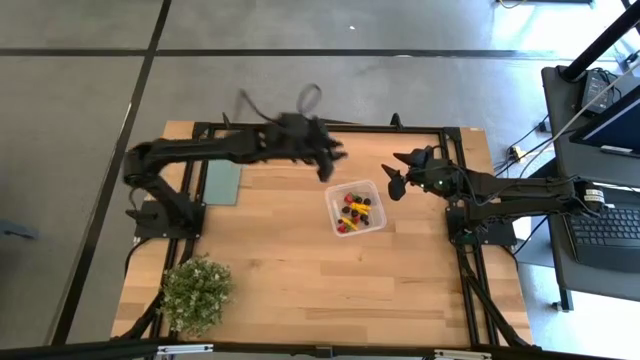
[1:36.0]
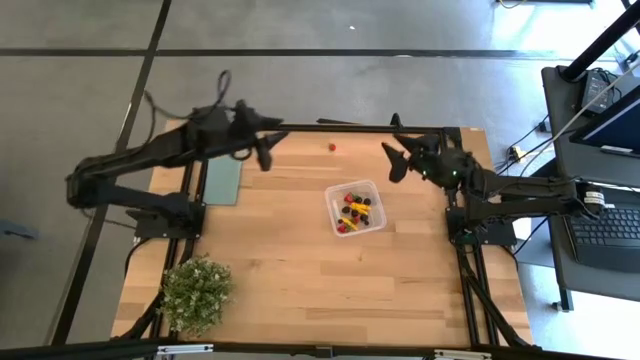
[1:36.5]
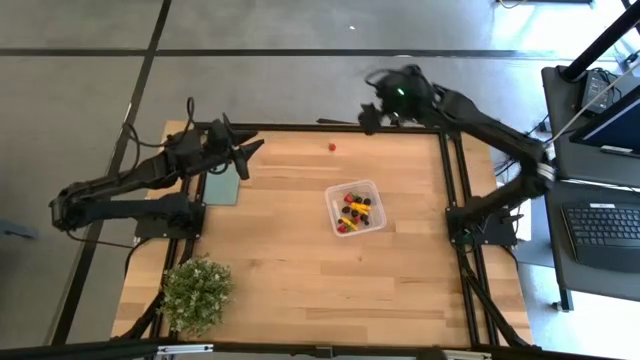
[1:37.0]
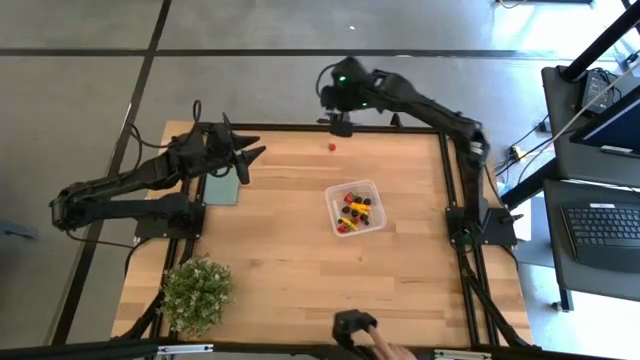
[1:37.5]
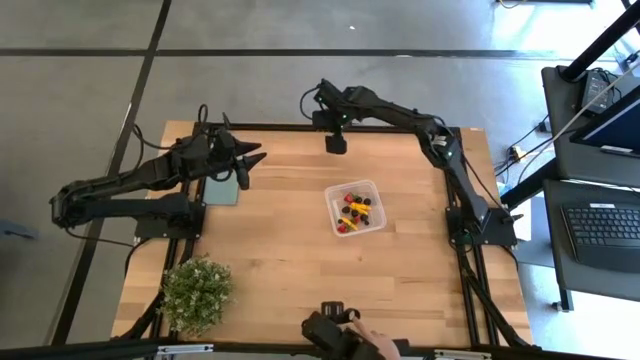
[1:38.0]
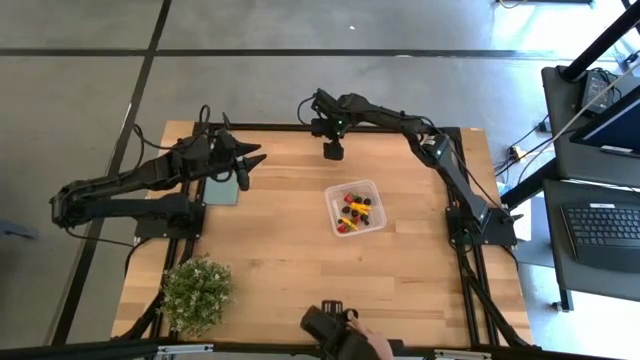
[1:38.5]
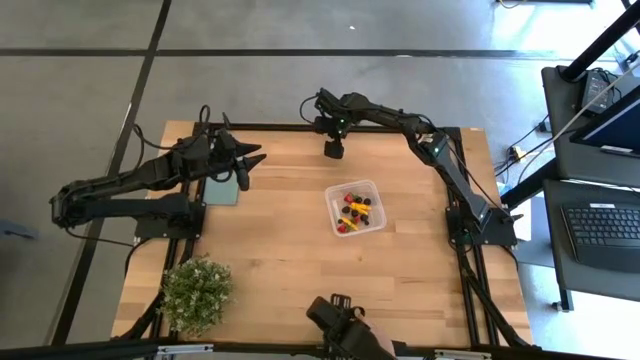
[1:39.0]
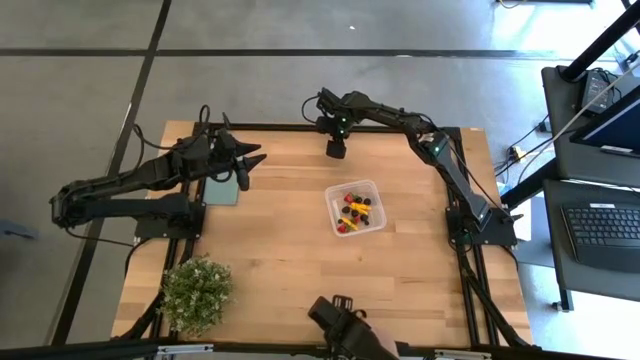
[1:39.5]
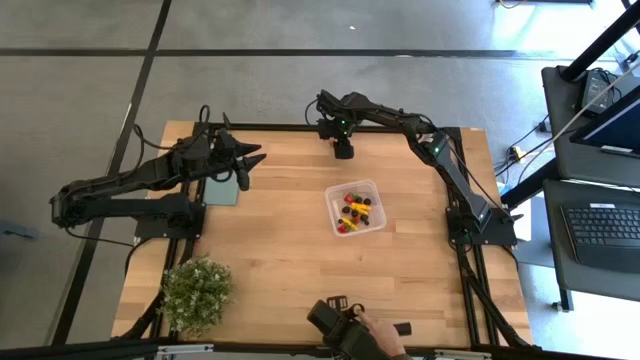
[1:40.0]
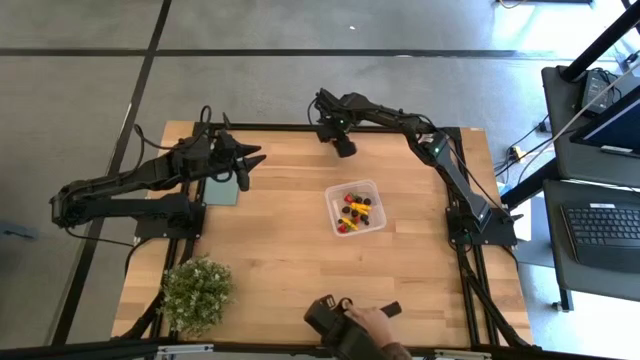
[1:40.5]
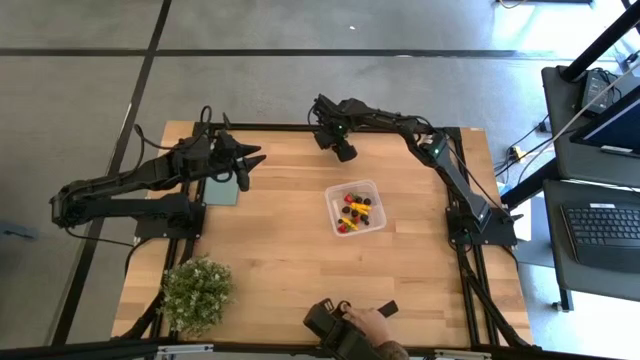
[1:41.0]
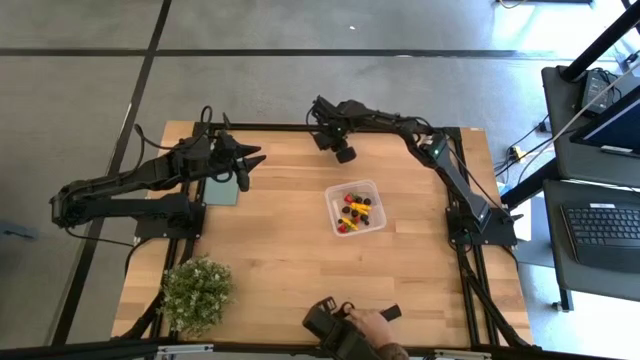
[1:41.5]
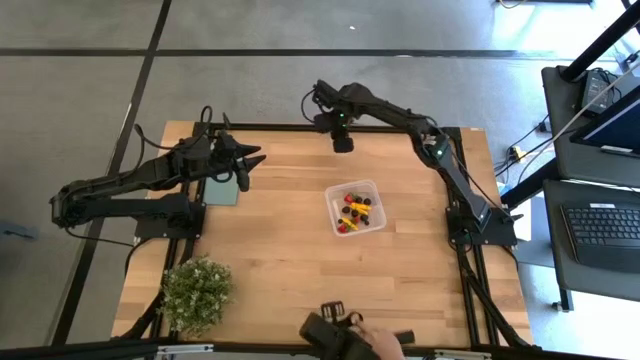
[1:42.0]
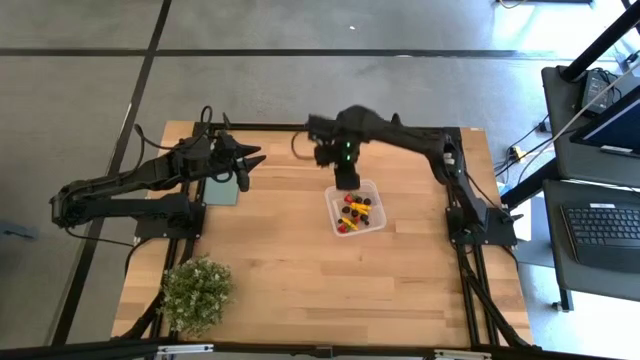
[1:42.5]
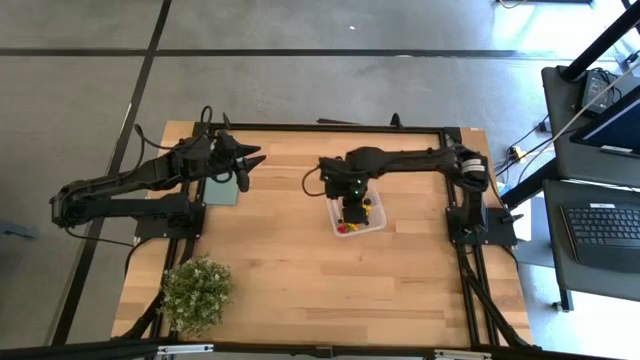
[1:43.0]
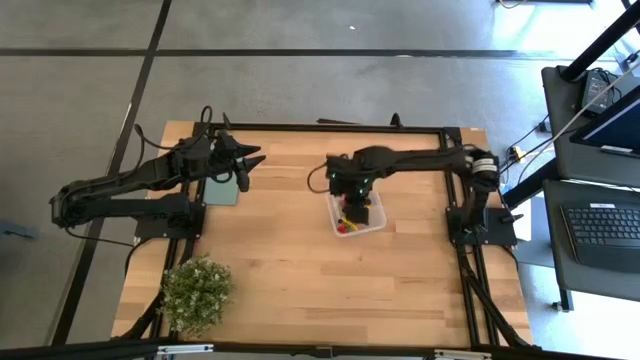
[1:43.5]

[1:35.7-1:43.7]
Task: Pick and placing Produce into tupperware
Put the strawberry into the transparent bin

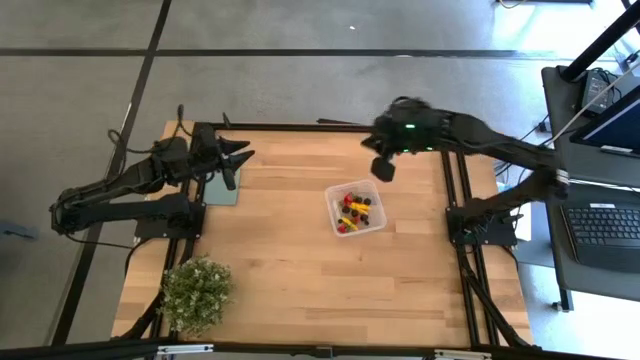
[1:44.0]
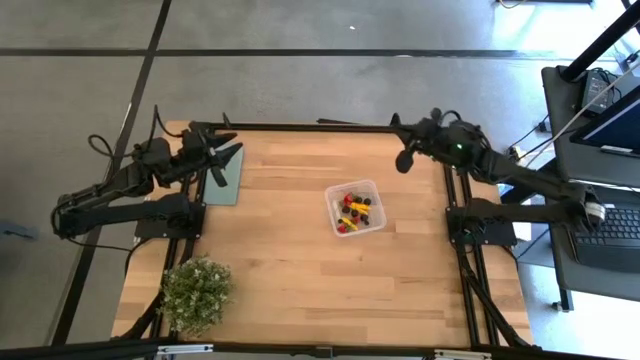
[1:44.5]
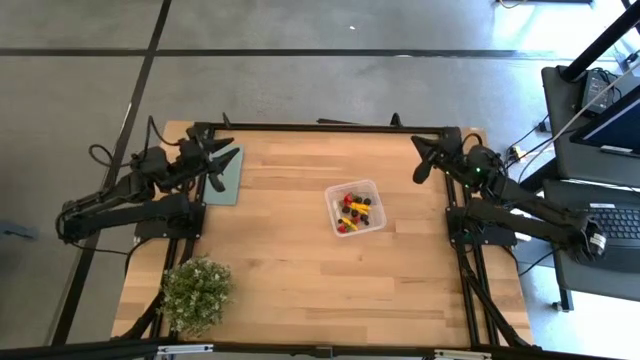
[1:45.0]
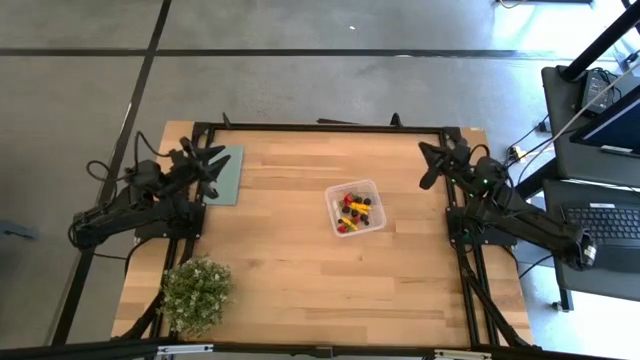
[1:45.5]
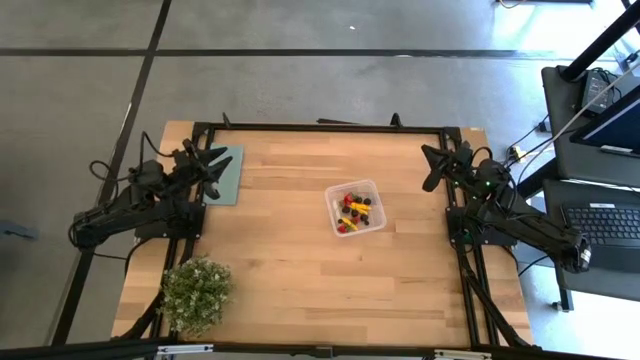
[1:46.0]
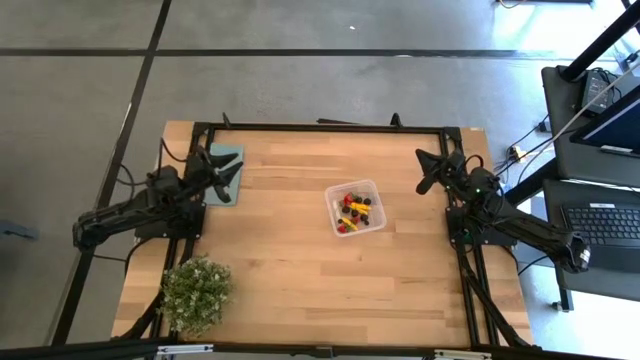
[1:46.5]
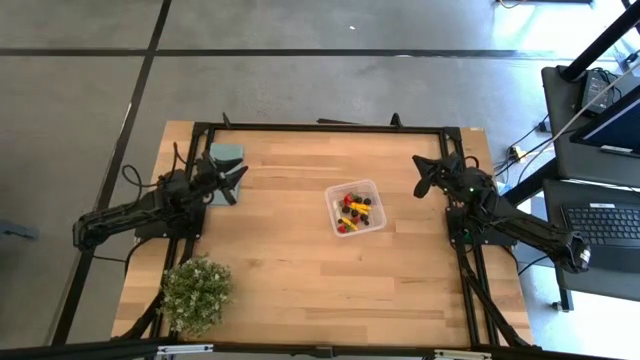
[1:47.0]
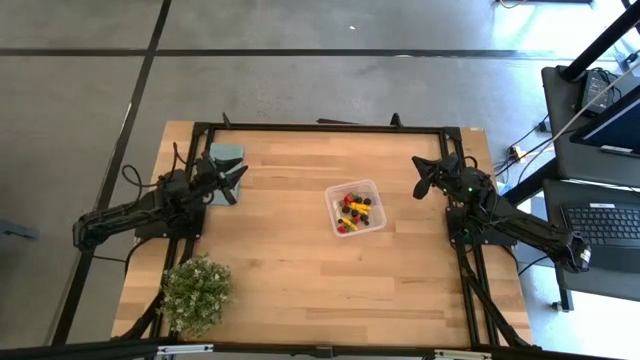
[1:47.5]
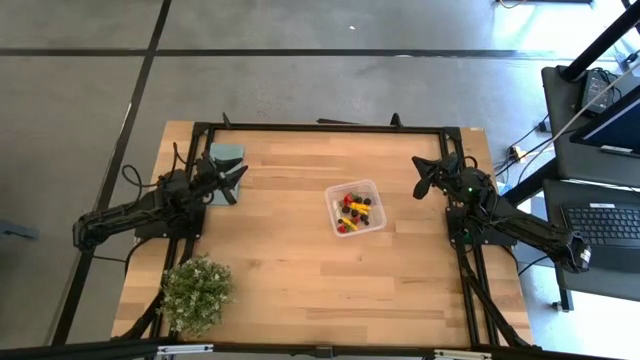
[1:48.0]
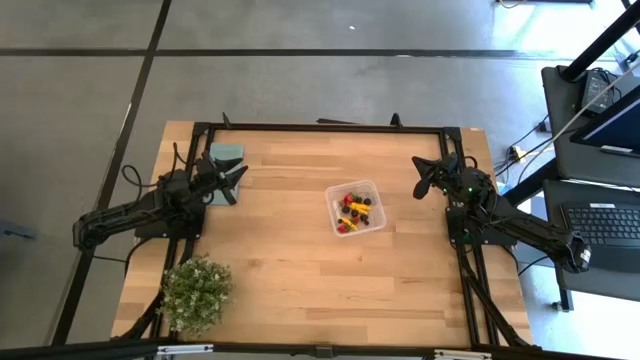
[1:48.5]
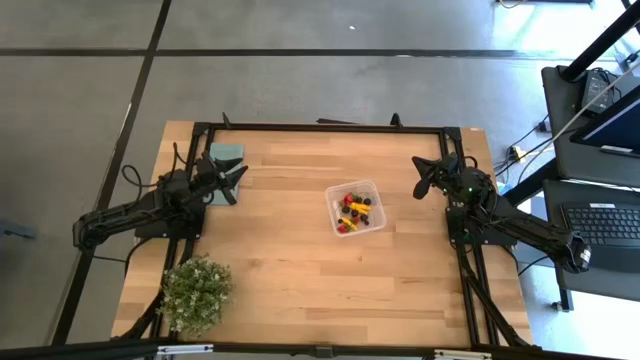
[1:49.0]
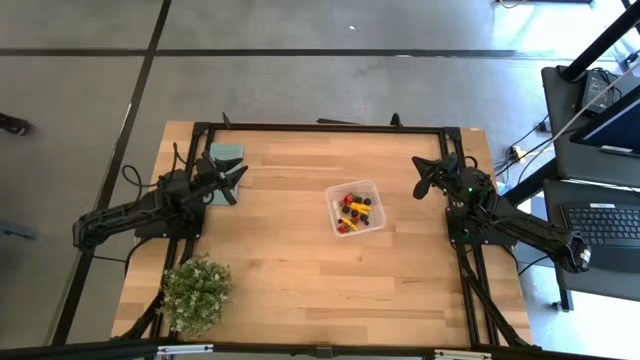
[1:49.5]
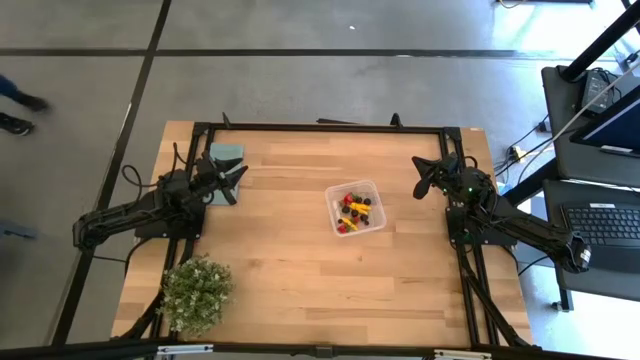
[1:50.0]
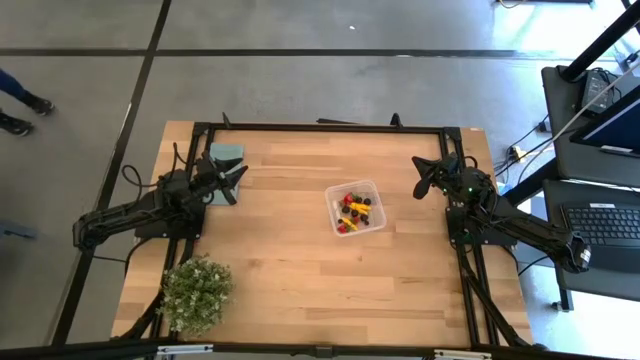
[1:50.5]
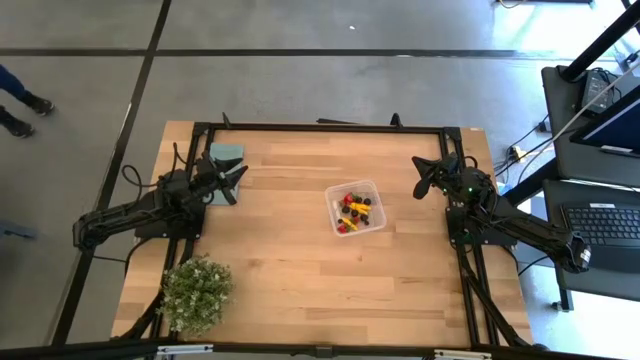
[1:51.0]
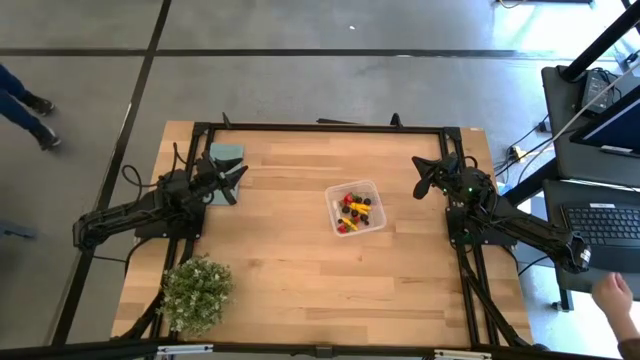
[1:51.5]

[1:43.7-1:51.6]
Return to Home Position

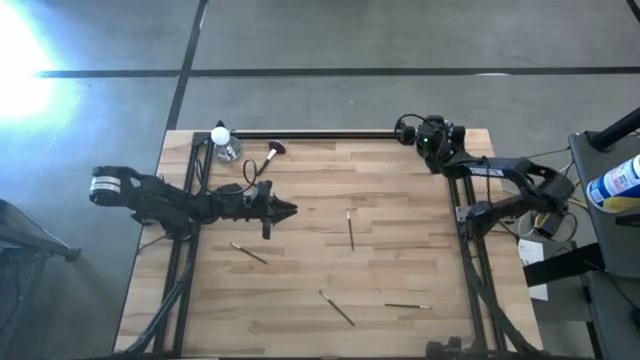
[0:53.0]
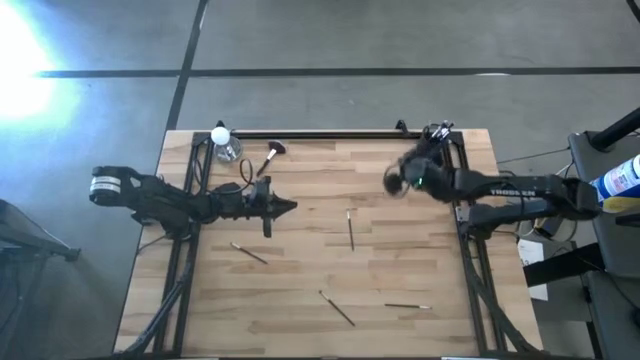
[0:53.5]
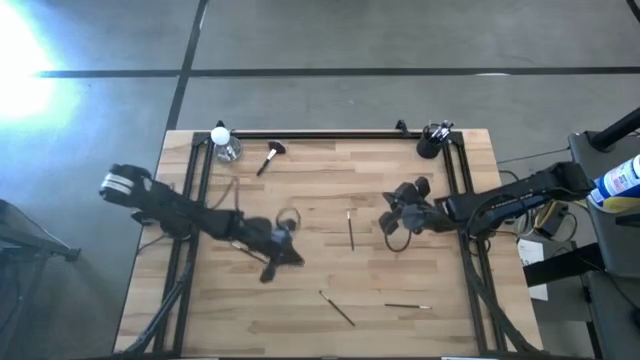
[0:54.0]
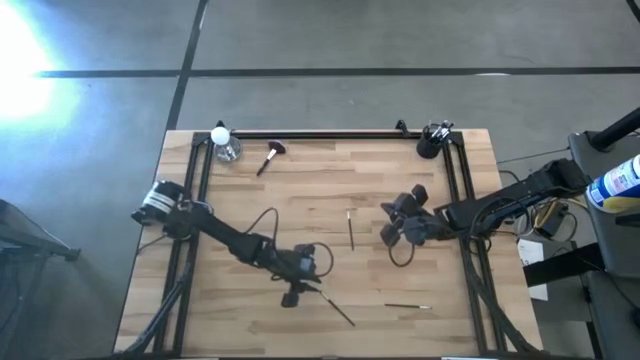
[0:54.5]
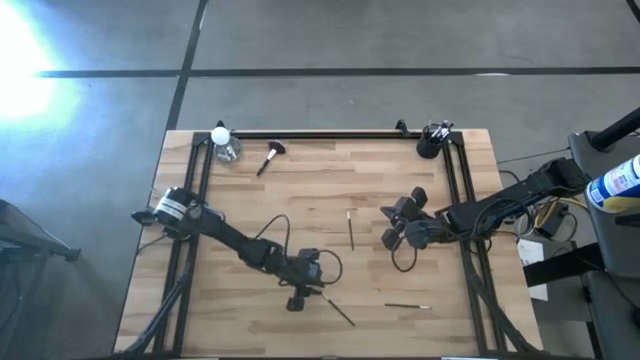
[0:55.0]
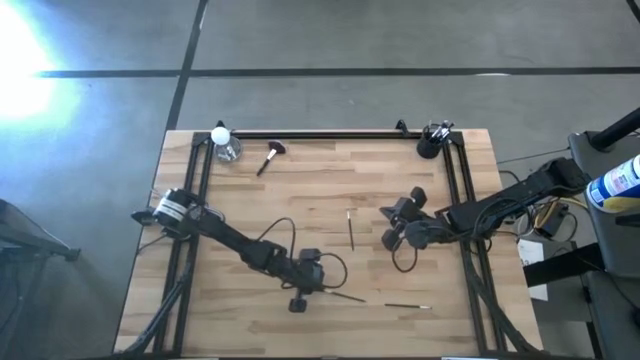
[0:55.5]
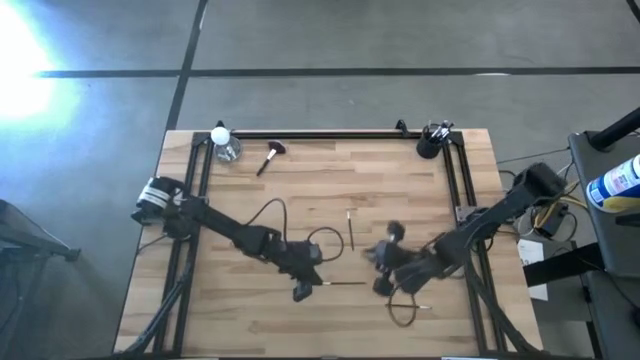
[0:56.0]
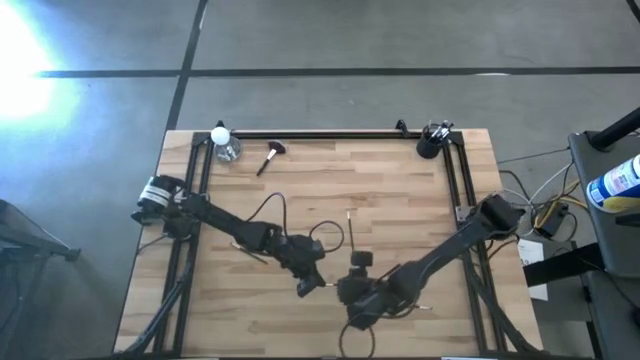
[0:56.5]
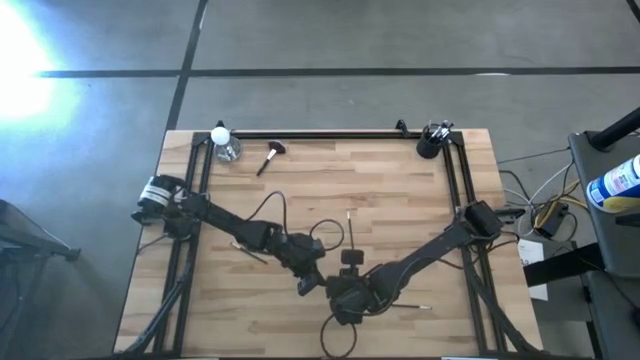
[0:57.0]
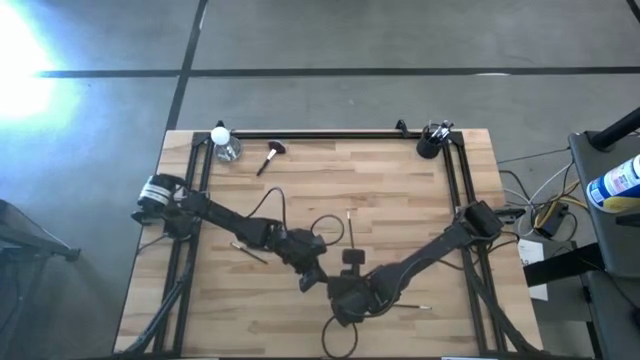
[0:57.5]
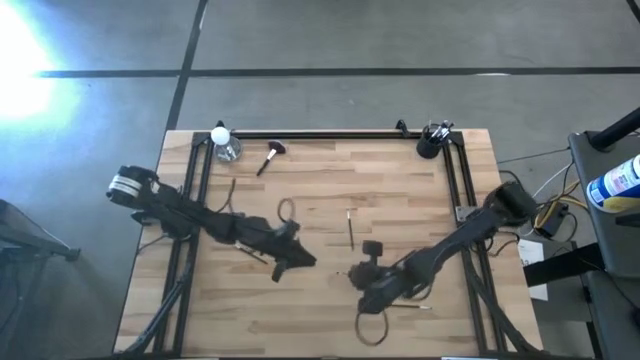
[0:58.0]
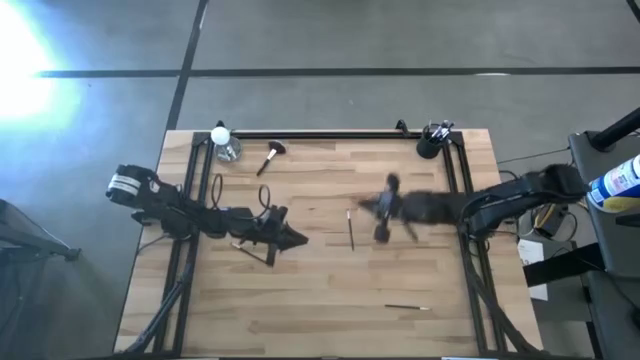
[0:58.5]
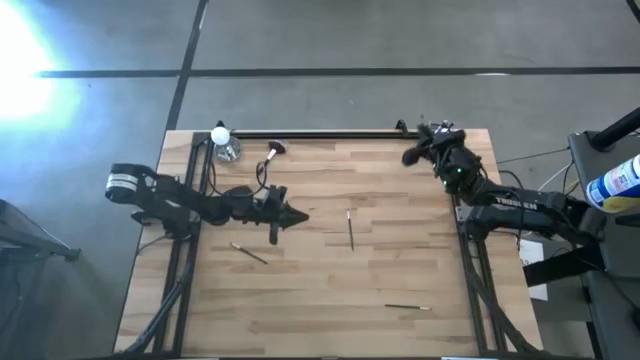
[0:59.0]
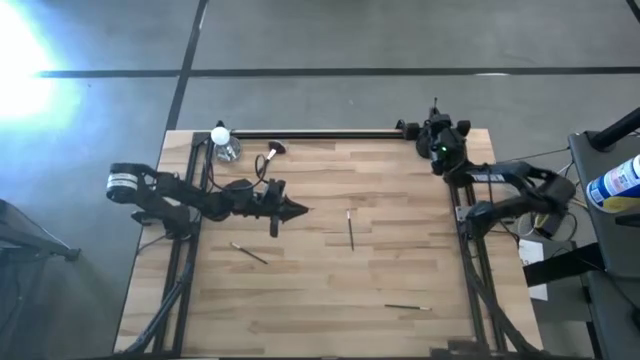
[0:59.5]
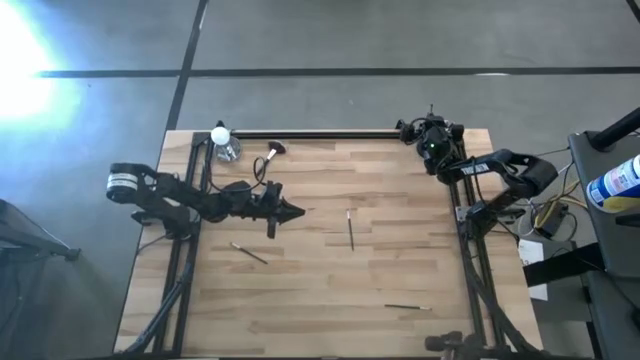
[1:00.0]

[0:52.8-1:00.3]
Task: Put items in baskets/containers
Put the eyeshadow brush into the mesh organizer
